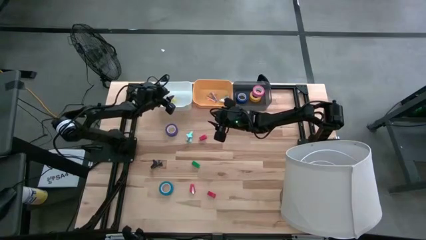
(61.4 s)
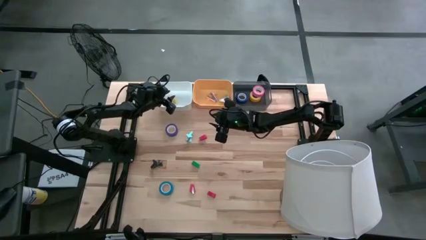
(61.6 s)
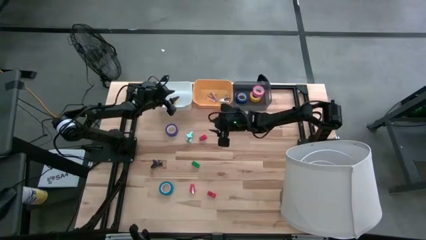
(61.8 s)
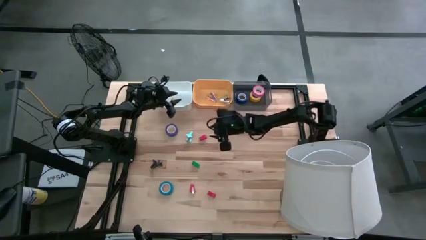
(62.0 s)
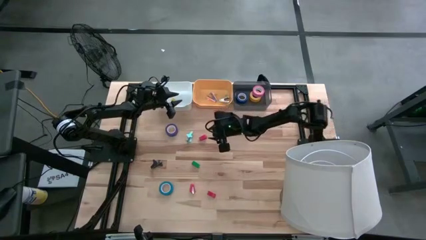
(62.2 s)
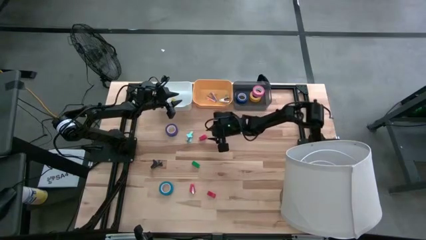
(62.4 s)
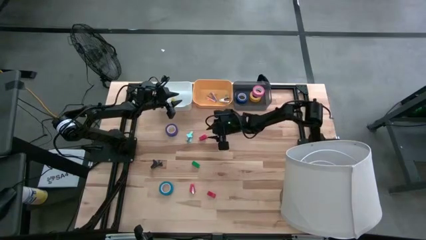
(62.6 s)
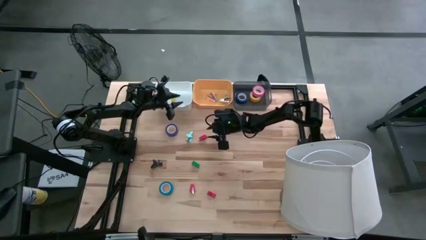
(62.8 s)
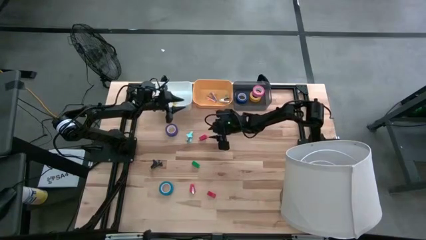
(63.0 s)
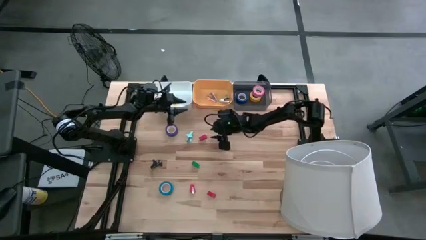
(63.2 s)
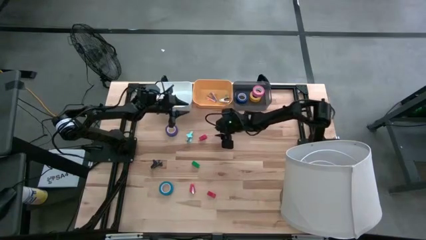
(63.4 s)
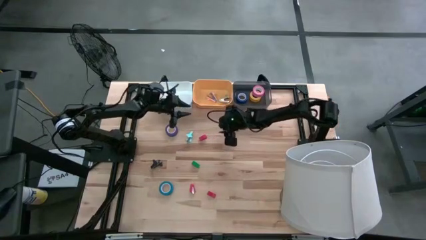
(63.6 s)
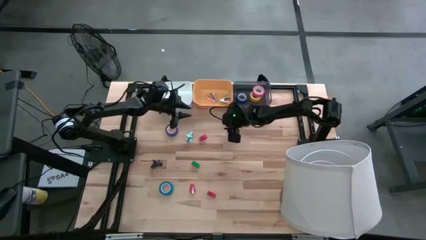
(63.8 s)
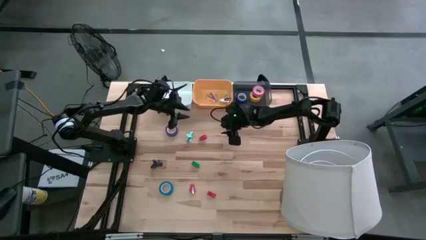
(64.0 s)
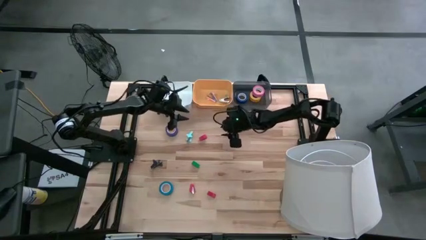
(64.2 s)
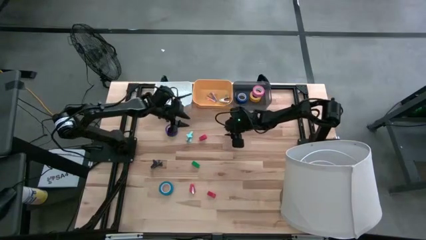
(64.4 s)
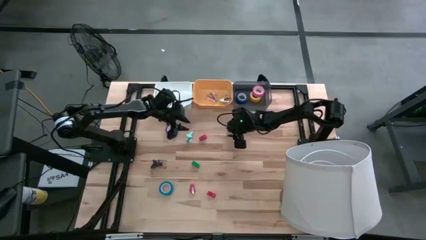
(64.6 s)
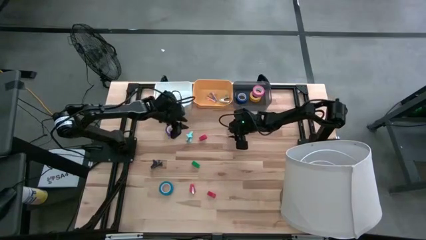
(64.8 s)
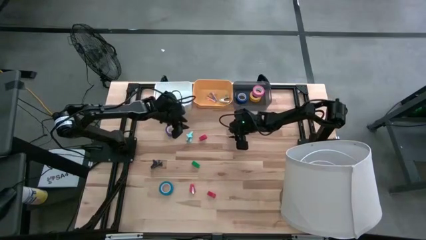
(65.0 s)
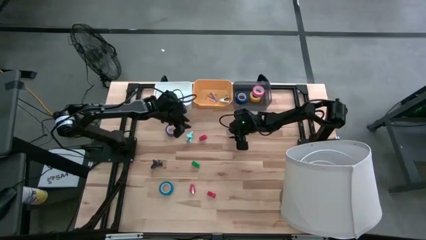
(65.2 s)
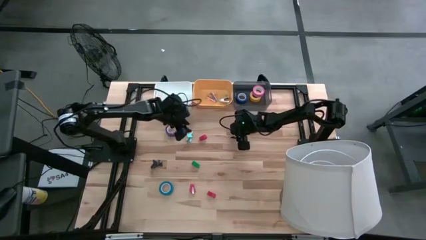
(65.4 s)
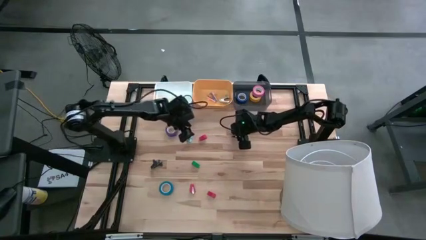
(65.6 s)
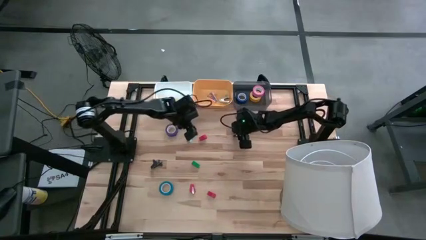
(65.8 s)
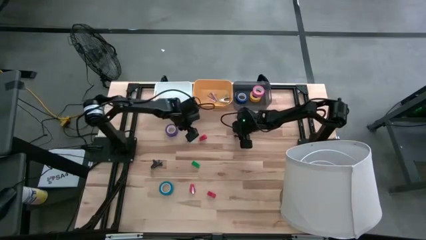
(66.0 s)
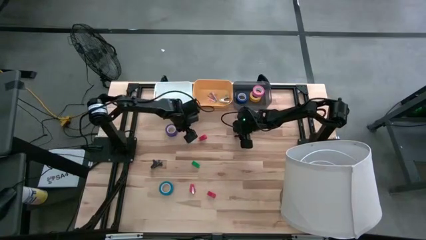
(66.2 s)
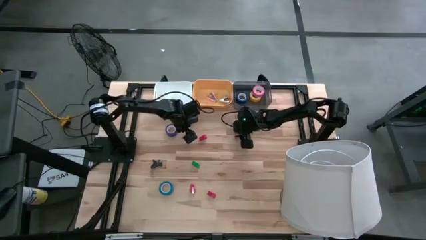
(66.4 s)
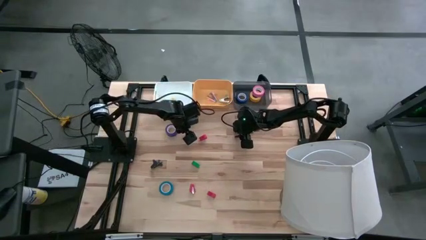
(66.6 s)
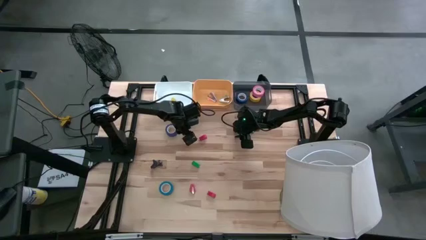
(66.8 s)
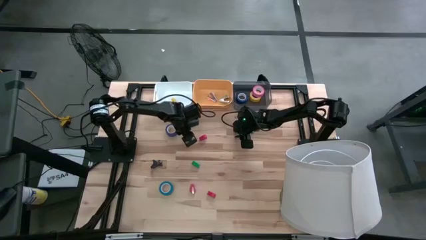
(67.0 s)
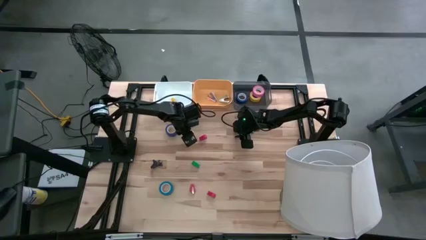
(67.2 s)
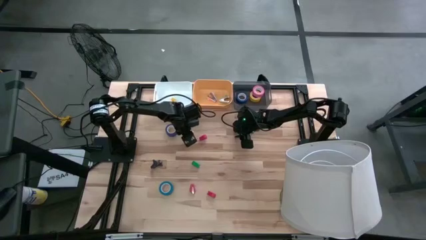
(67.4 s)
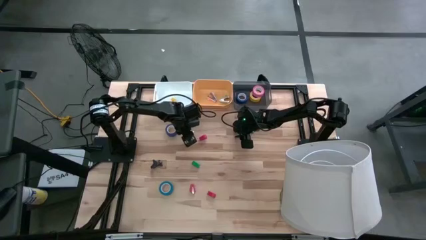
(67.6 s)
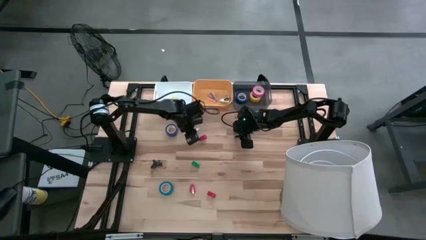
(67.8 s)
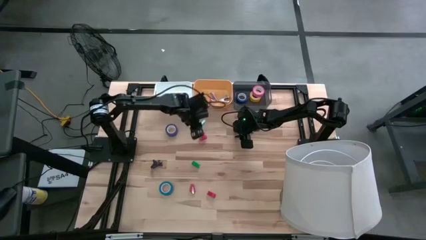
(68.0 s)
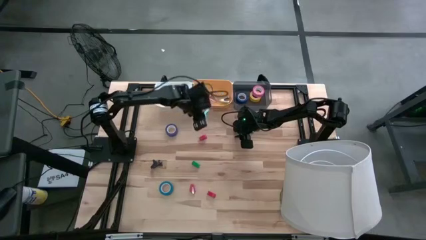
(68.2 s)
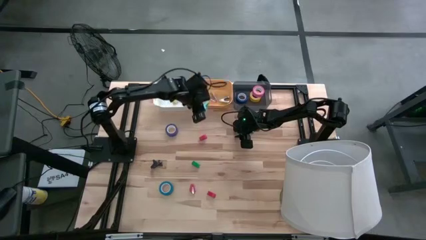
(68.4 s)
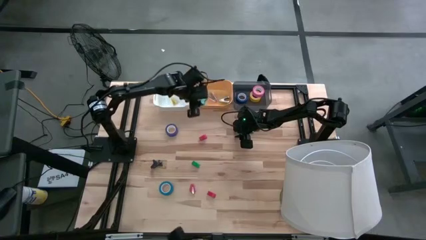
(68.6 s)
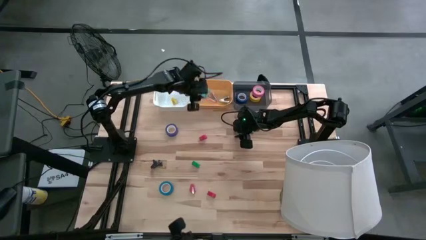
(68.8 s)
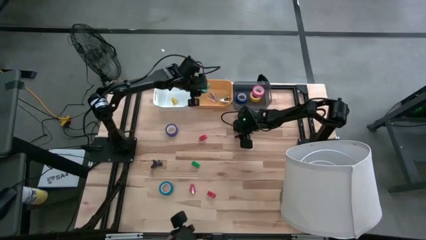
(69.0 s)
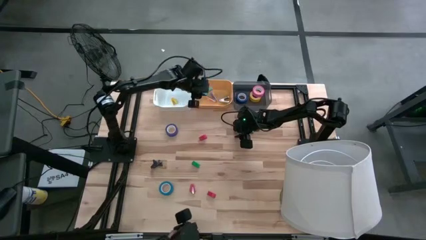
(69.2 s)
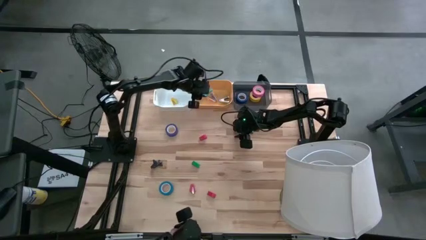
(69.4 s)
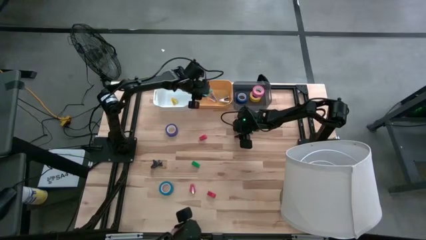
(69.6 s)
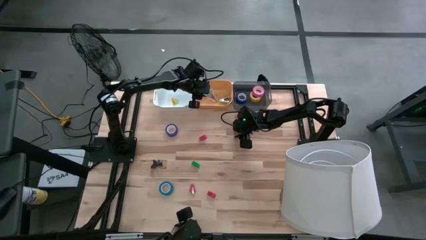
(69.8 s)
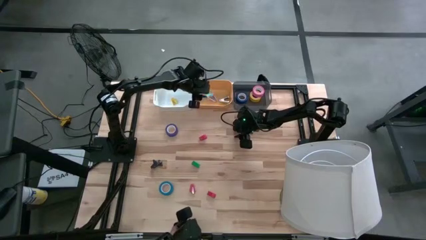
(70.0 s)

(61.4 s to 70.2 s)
Task: Pick and place Stapler, Stapler remover, tape
Put the blue staple remover into the orange bin
